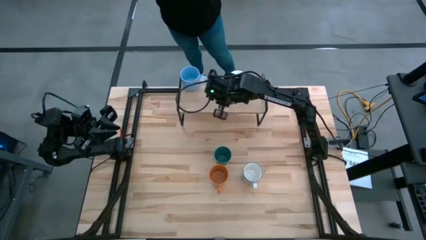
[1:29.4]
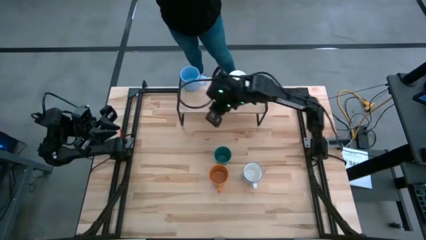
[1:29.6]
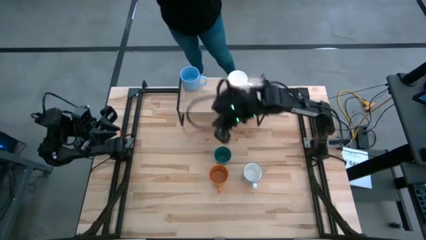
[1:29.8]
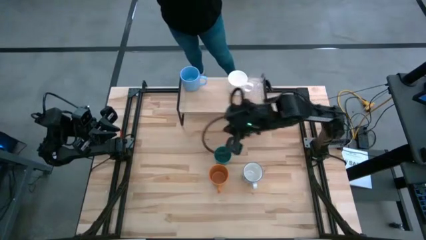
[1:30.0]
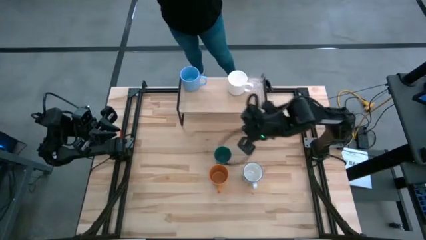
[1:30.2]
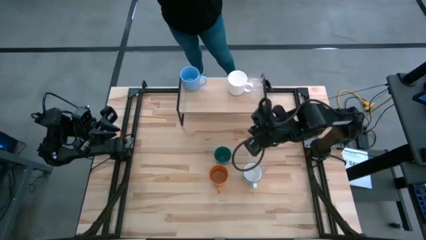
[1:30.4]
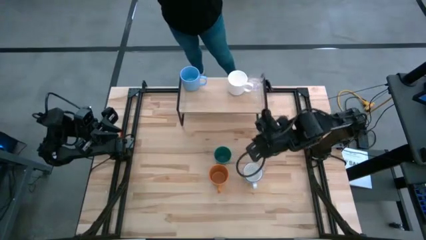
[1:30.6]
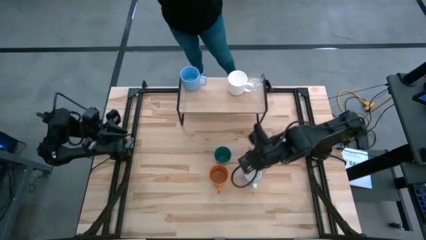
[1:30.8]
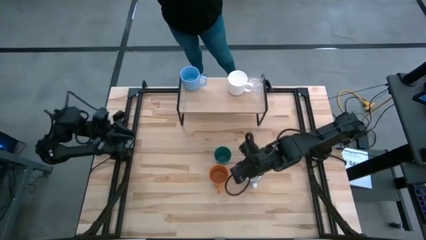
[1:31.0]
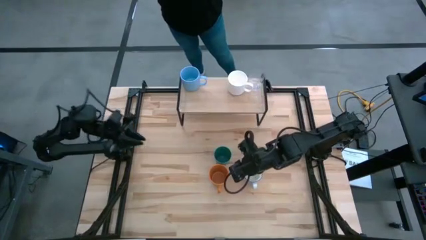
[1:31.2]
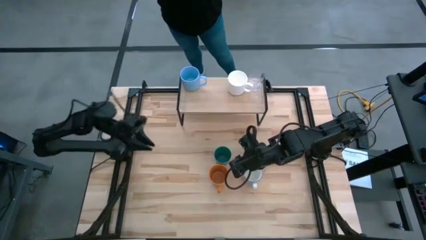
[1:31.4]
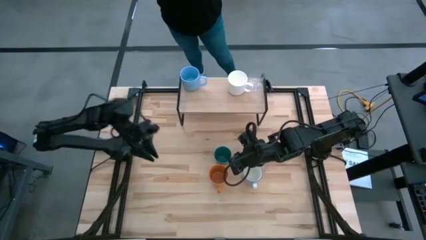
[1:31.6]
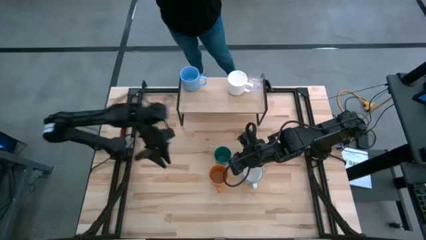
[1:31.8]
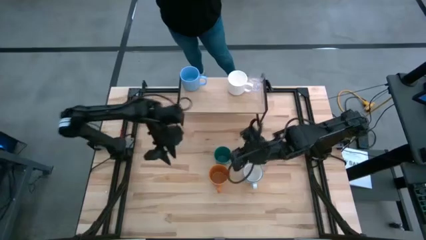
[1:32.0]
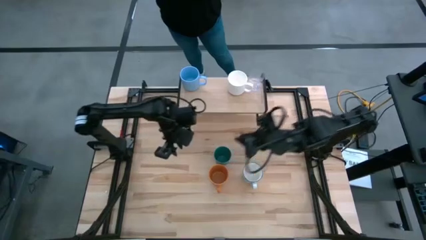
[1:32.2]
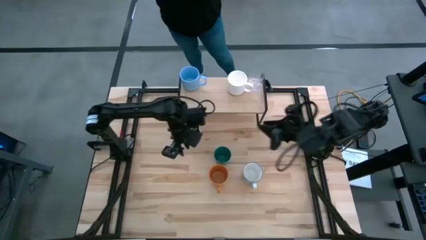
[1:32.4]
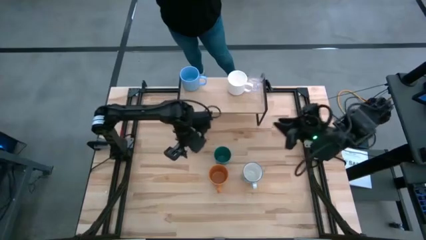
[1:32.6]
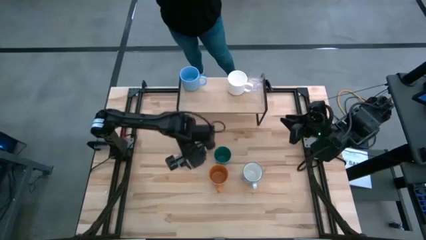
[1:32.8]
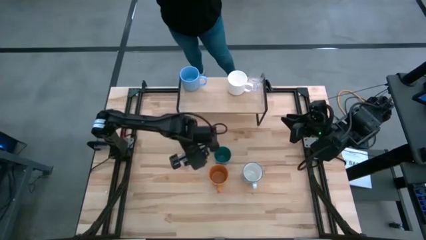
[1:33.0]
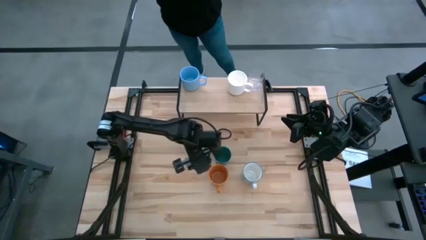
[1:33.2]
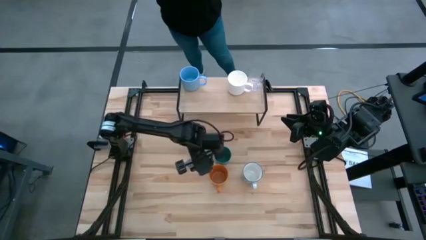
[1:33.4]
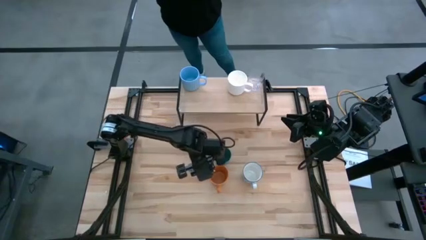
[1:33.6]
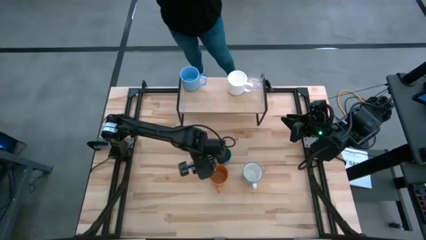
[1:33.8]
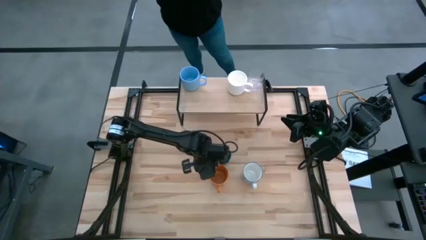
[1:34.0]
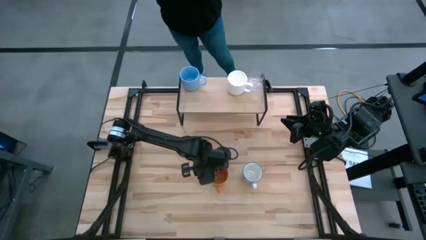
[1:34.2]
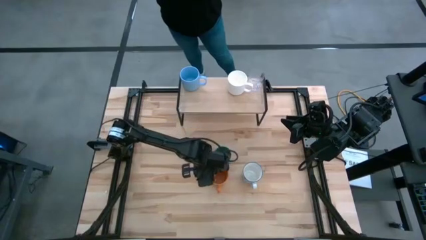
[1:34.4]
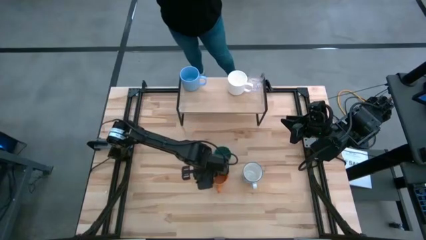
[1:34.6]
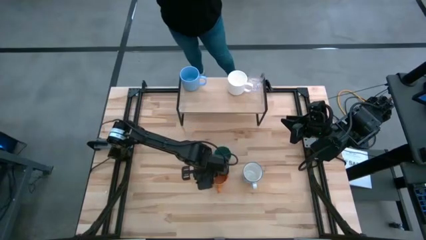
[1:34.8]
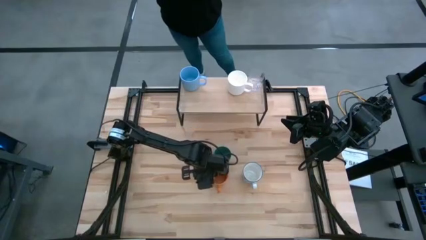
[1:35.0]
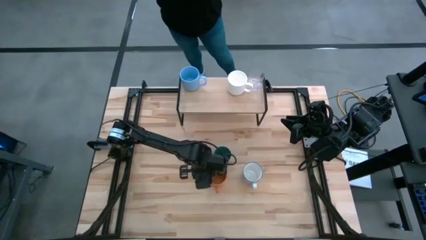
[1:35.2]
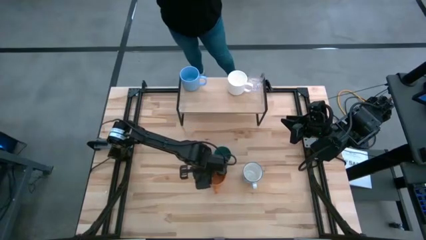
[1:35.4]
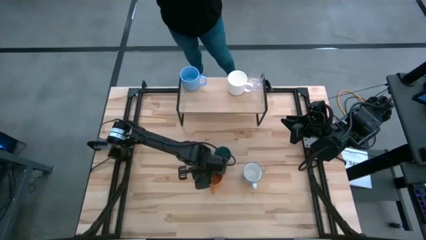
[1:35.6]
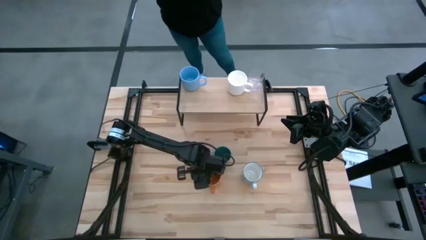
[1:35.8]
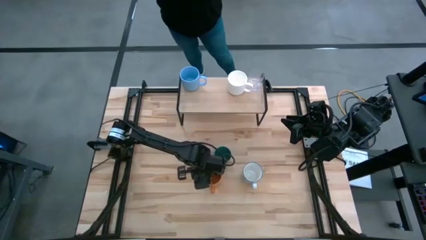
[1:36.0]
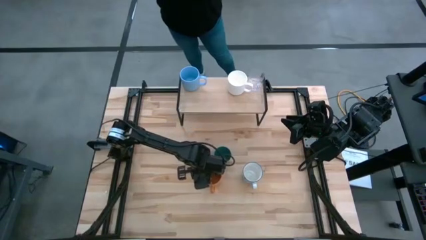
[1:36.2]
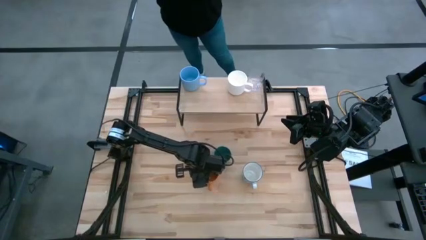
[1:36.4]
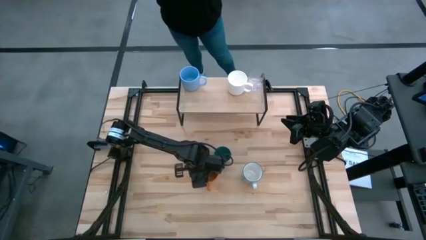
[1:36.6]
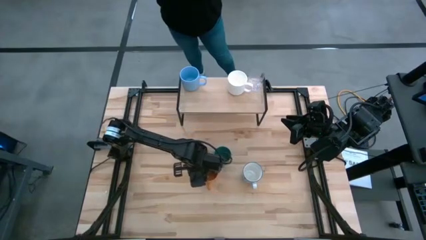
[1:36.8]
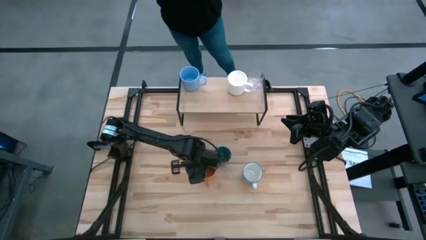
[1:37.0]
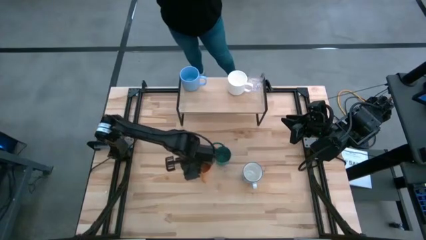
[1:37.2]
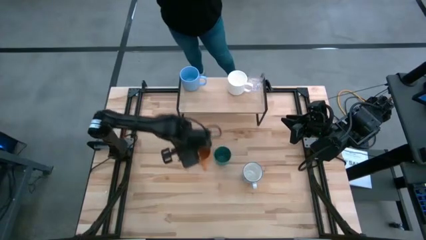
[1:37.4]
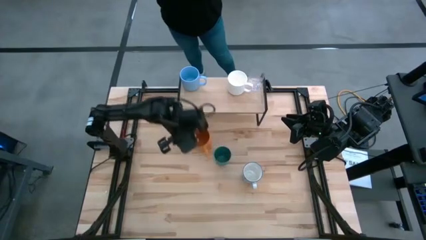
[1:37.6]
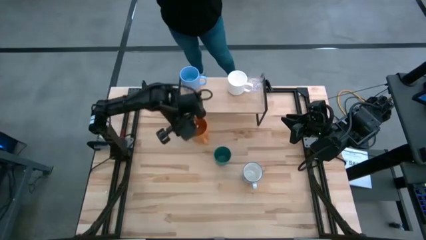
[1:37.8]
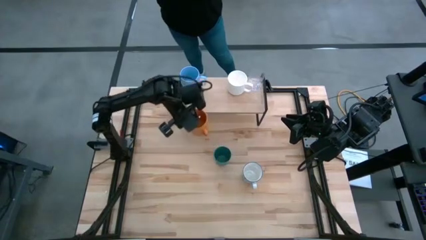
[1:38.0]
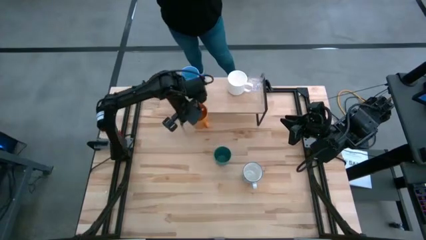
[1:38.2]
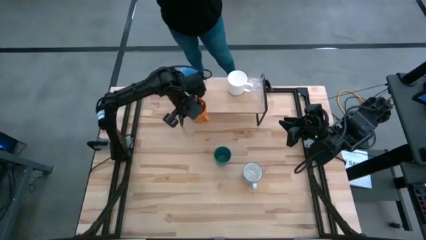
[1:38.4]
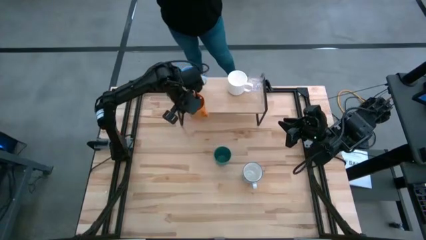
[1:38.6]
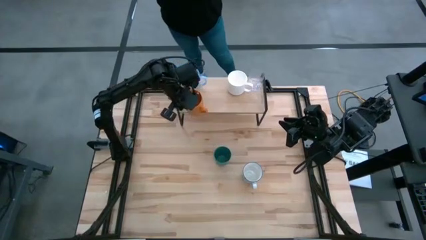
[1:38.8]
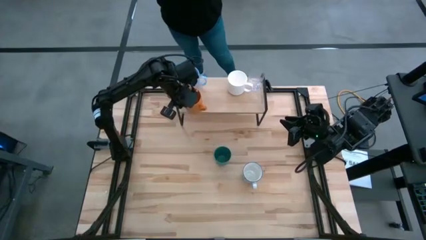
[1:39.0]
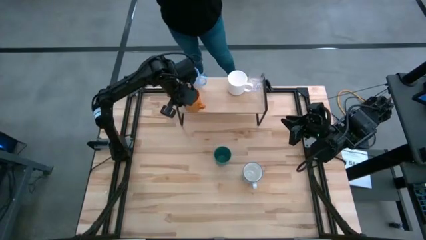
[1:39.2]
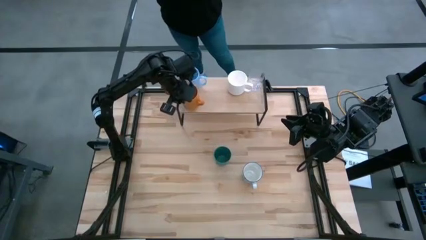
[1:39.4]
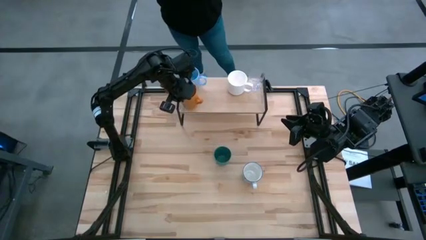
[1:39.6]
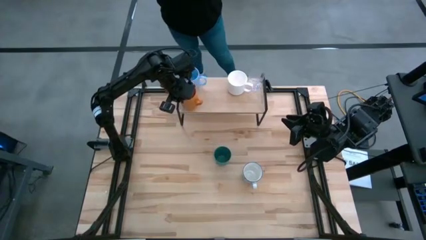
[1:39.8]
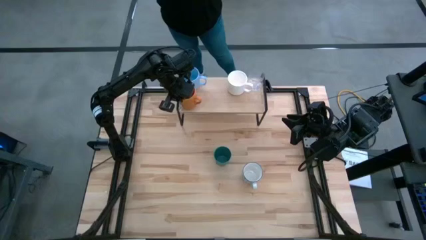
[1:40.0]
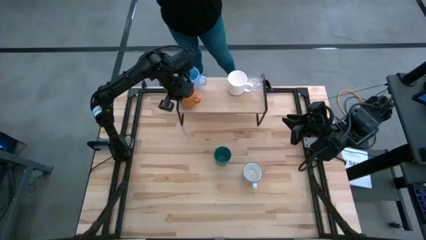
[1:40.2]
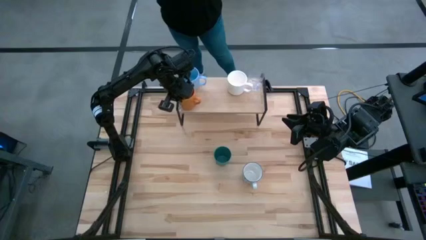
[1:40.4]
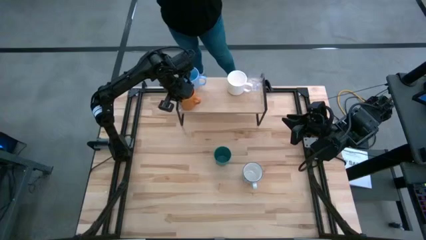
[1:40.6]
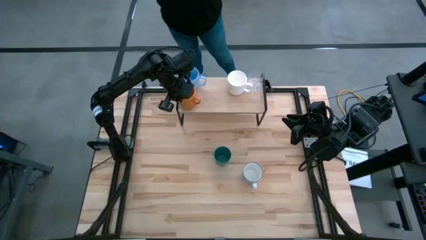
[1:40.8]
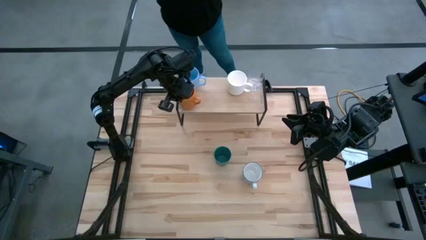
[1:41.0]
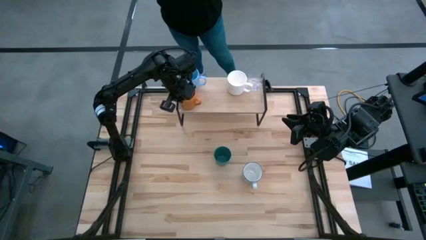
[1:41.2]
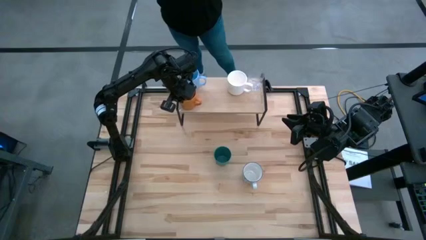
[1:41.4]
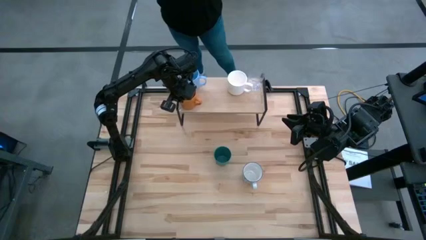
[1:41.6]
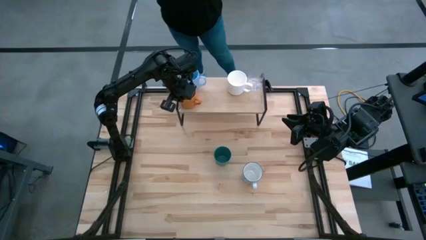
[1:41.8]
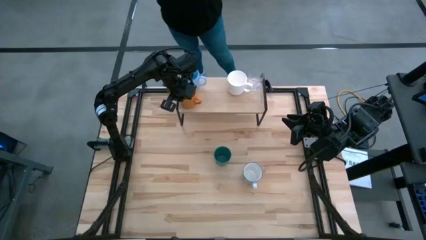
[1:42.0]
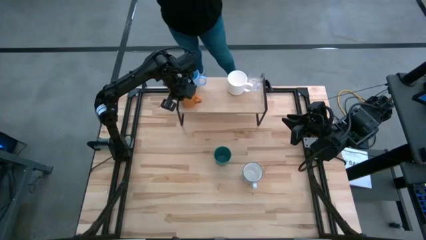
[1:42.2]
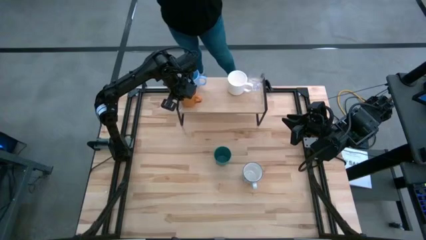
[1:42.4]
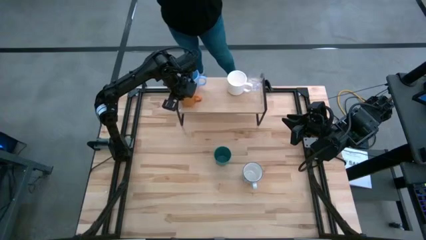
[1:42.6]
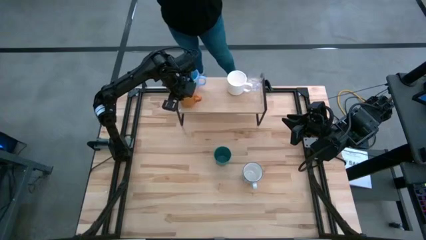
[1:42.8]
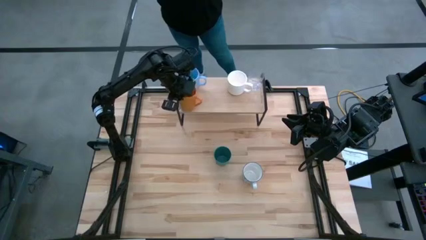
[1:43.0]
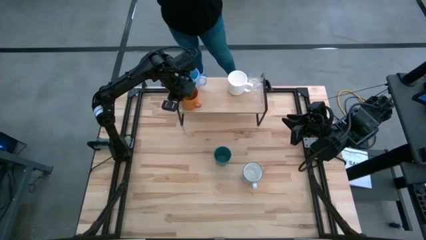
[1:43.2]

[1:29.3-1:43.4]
Task: Stack small to large cups/mugs on shelf
Put the orange mug on the shelf
